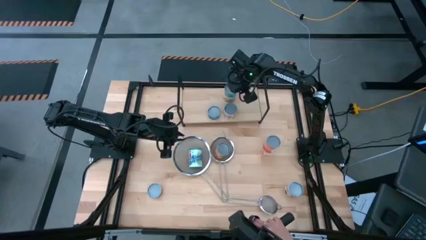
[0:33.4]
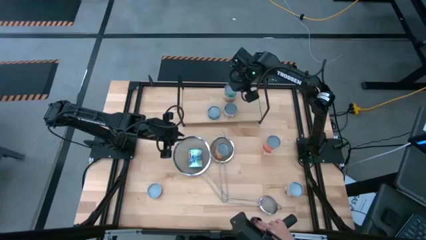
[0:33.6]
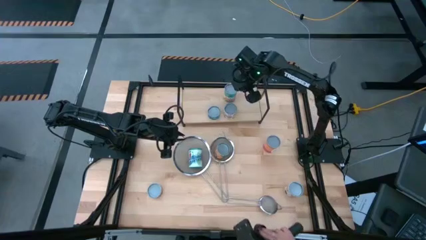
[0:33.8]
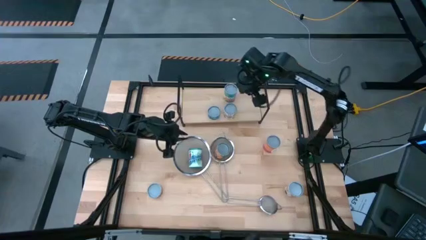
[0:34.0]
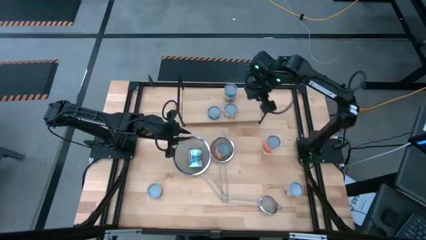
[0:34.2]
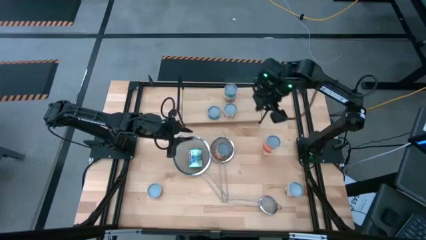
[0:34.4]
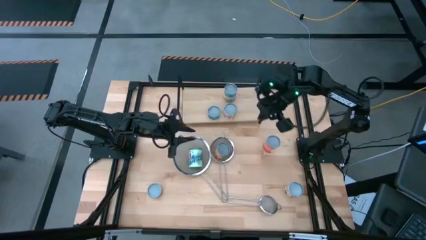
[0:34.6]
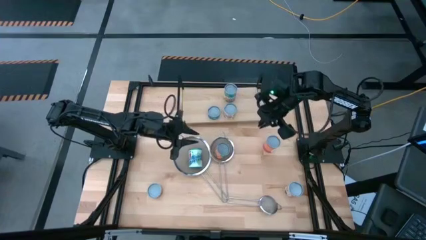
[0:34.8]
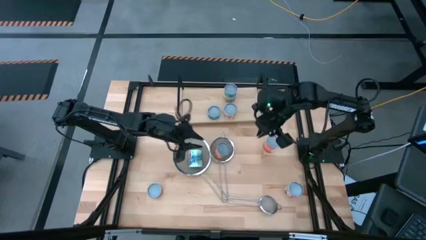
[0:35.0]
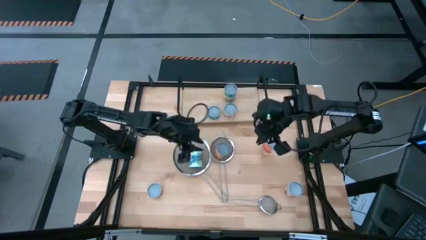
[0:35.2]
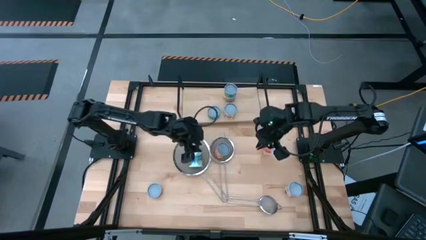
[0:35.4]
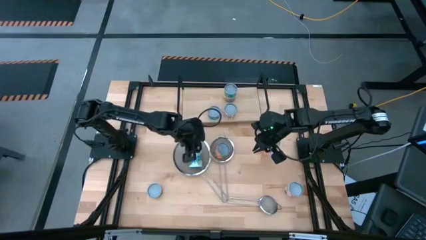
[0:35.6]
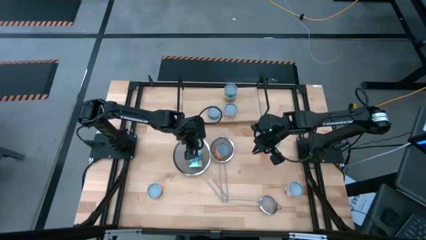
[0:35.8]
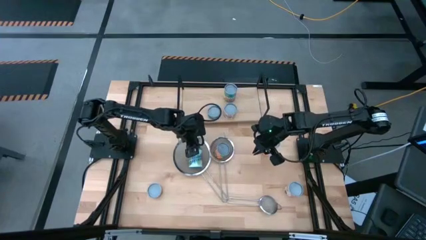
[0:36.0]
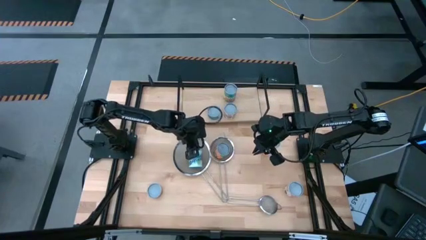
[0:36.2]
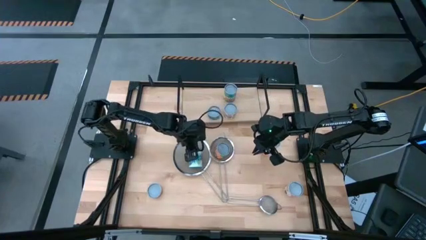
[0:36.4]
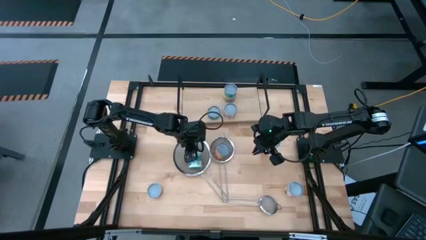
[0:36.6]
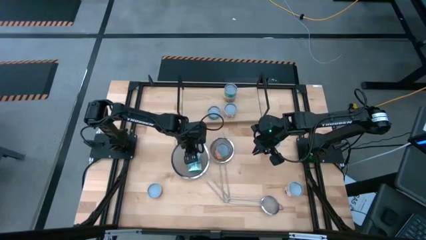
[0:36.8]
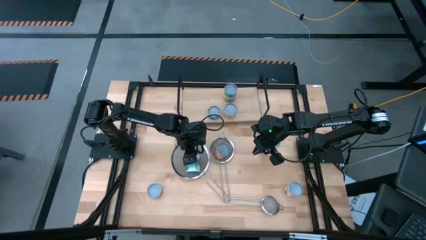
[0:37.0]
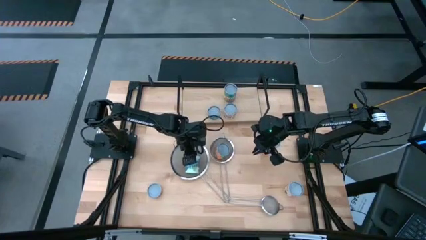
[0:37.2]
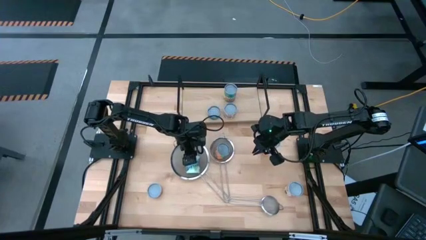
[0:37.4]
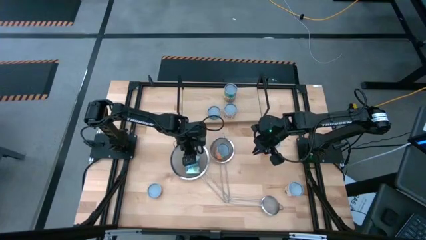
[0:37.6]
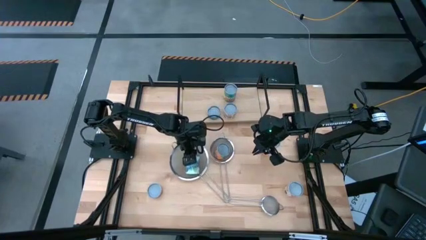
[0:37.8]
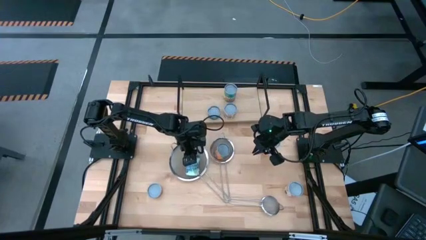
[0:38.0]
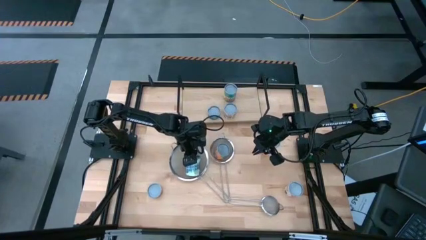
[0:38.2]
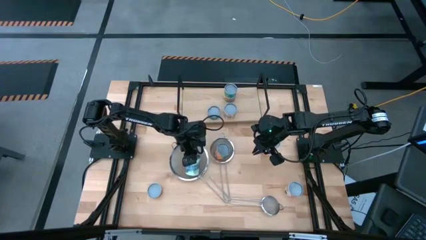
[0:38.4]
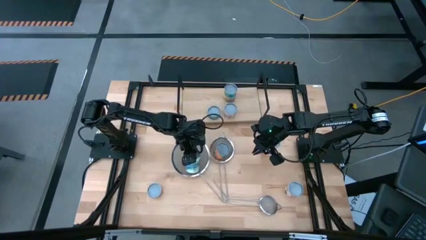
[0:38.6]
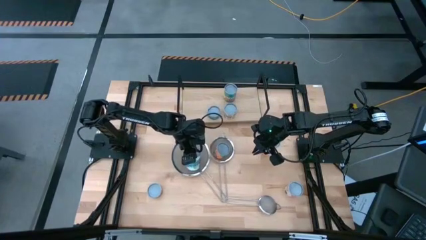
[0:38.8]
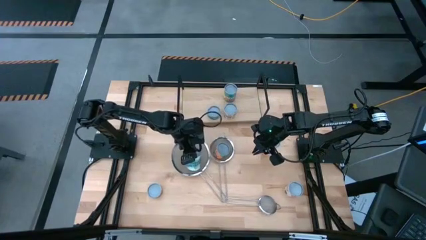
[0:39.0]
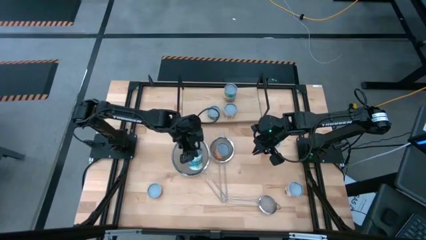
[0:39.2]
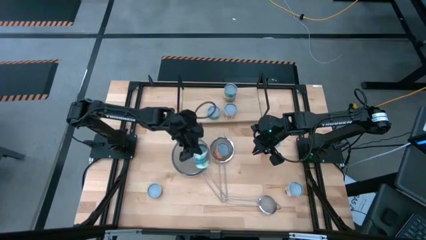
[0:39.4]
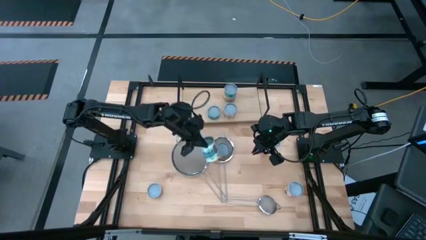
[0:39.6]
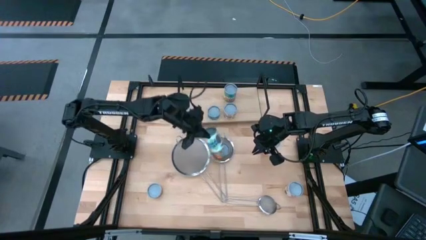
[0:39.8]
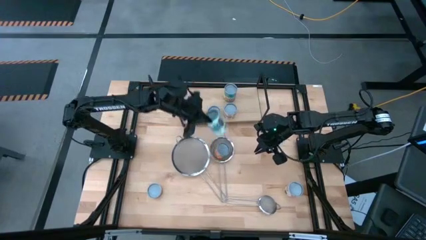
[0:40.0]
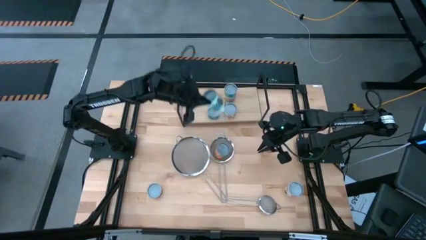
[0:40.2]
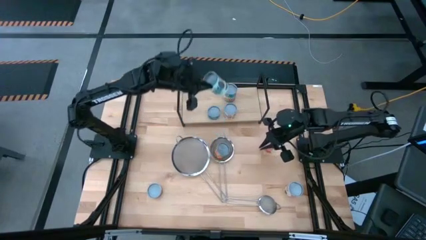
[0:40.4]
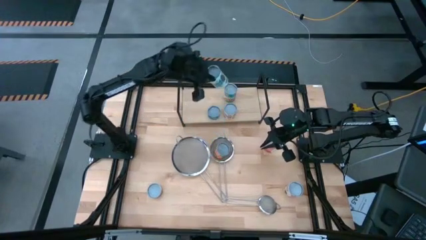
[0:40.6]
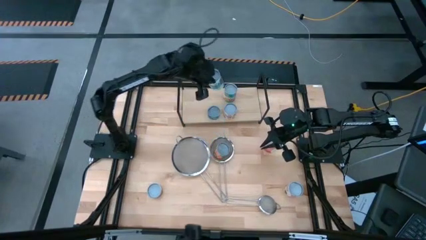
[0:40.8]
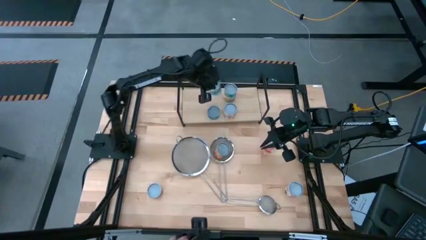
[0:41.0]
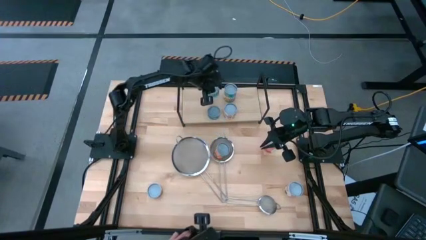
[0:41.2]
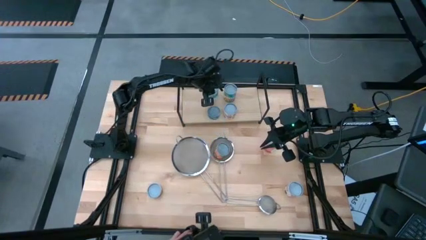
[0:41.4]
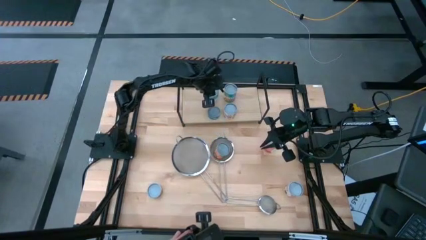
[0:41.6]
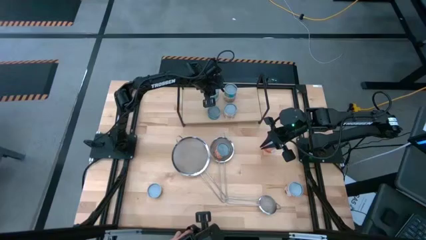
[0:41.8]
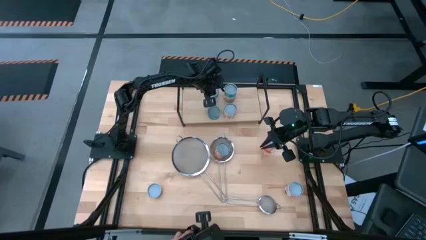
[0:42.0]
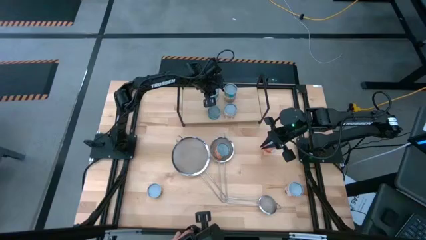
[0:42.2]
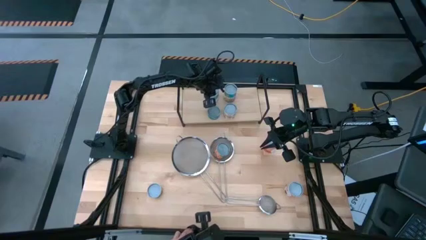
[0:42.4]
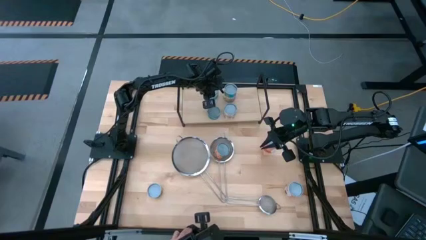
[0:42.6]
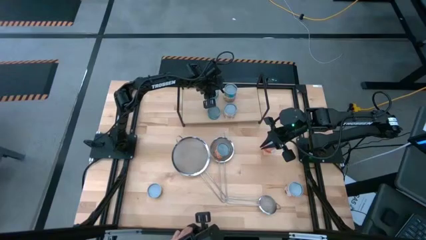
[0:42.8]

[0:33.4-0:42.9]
Task: Pick and place cans onto a shelf
Put the canned mixed veggies on the shelf

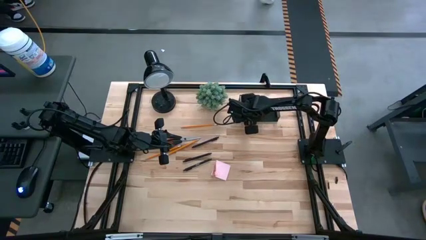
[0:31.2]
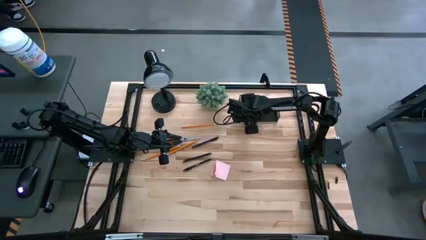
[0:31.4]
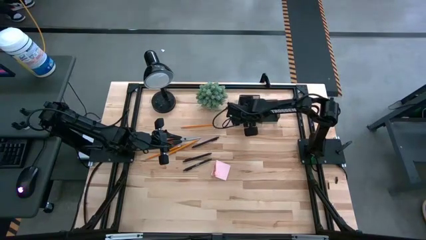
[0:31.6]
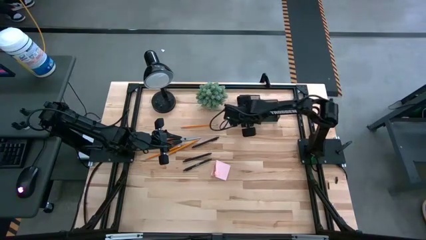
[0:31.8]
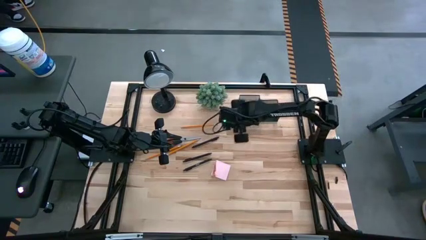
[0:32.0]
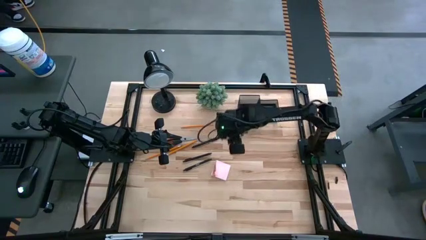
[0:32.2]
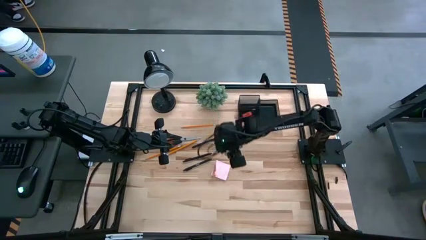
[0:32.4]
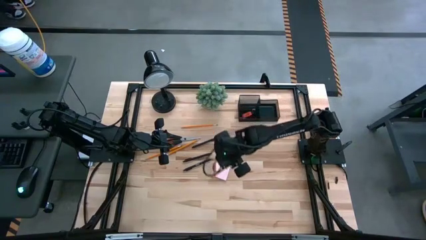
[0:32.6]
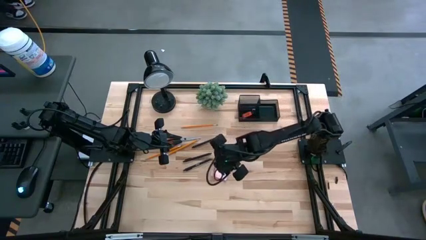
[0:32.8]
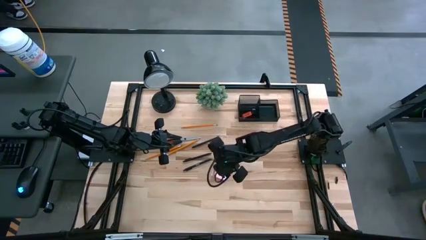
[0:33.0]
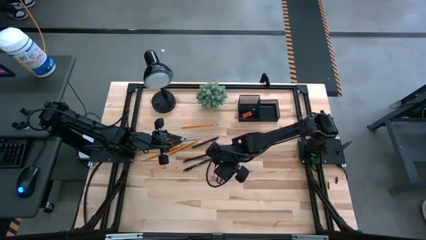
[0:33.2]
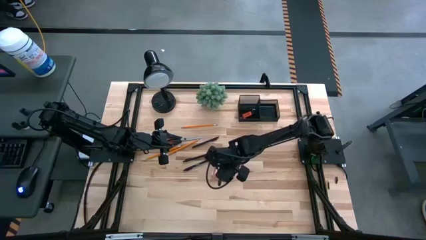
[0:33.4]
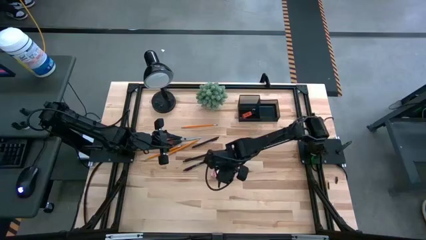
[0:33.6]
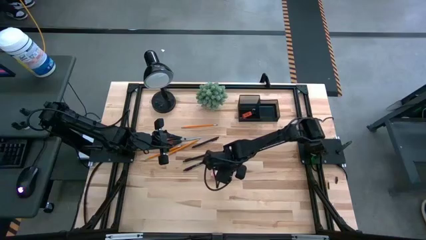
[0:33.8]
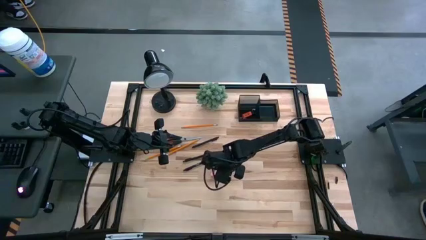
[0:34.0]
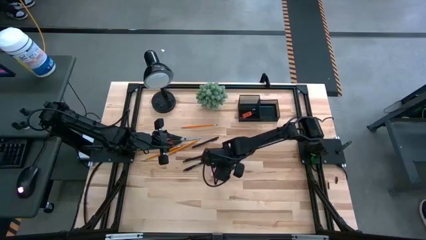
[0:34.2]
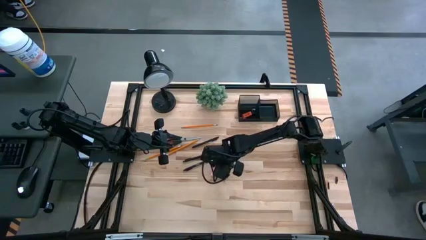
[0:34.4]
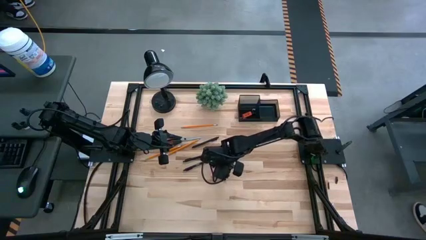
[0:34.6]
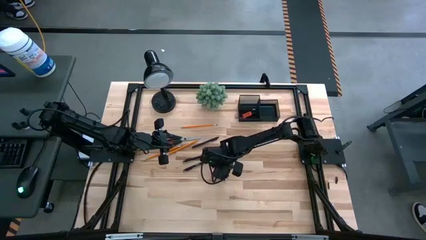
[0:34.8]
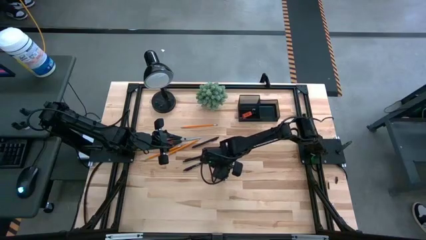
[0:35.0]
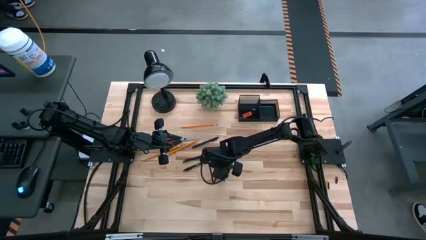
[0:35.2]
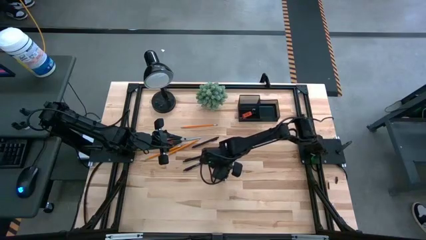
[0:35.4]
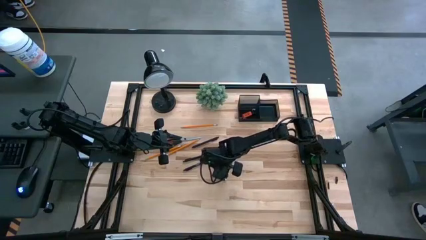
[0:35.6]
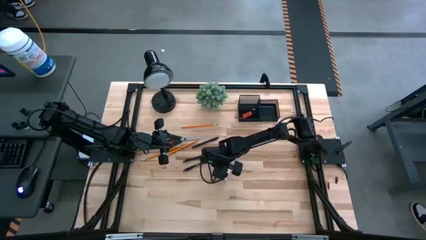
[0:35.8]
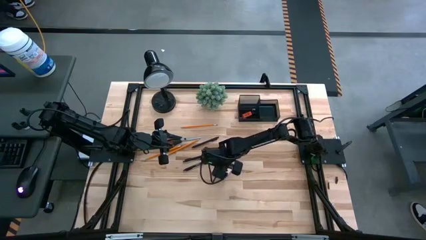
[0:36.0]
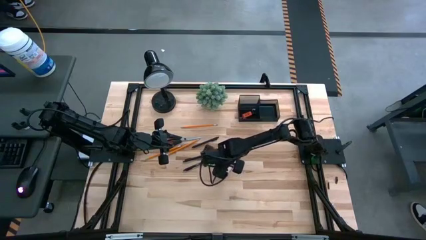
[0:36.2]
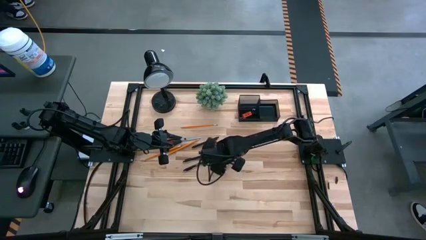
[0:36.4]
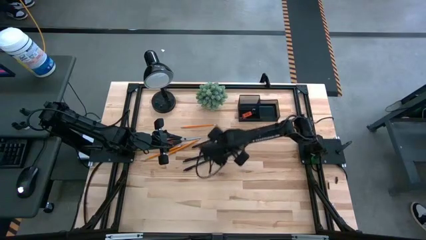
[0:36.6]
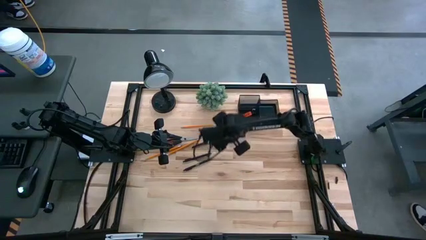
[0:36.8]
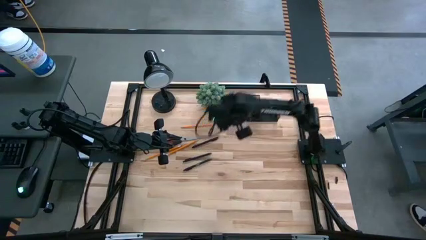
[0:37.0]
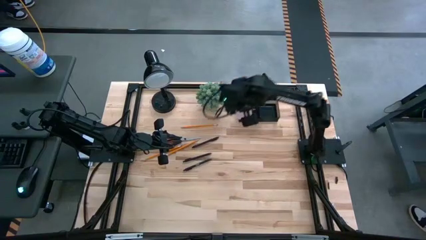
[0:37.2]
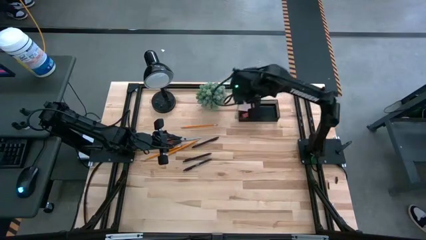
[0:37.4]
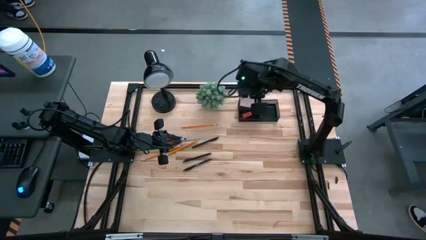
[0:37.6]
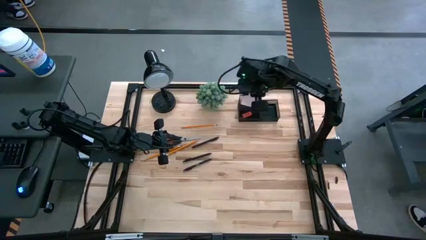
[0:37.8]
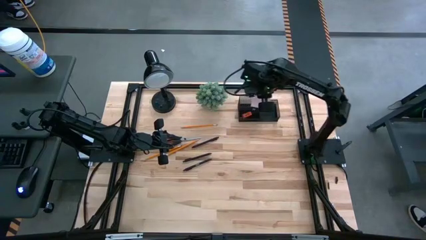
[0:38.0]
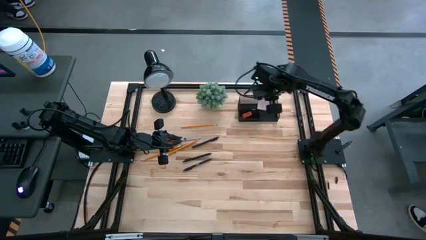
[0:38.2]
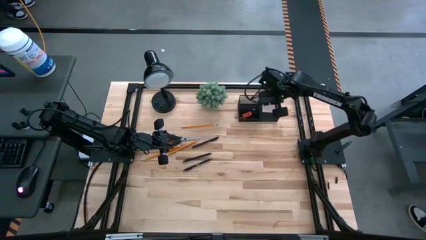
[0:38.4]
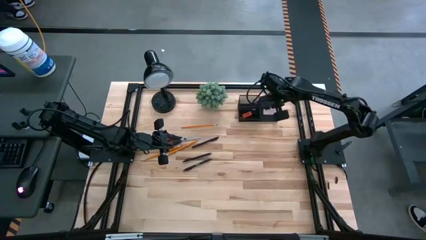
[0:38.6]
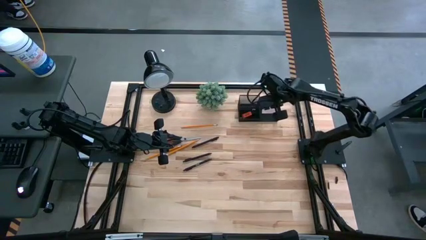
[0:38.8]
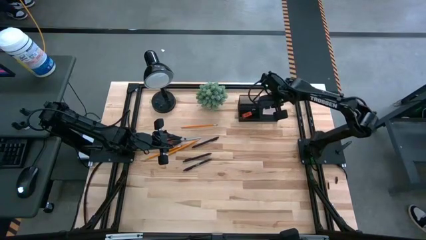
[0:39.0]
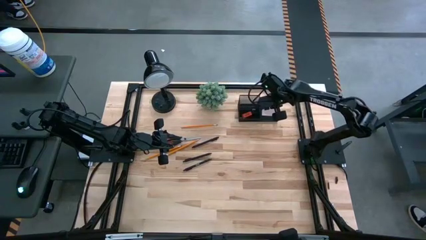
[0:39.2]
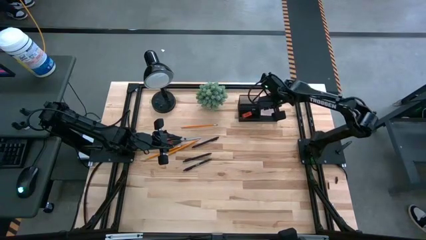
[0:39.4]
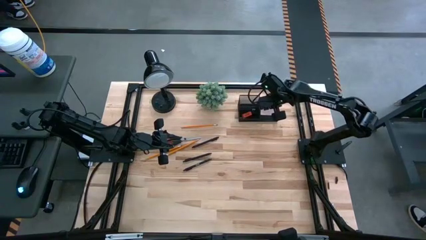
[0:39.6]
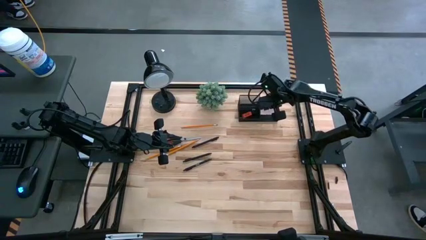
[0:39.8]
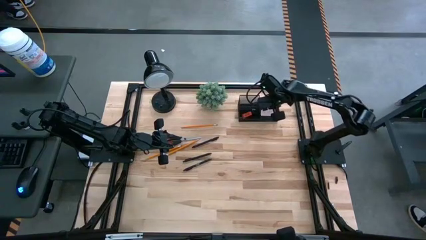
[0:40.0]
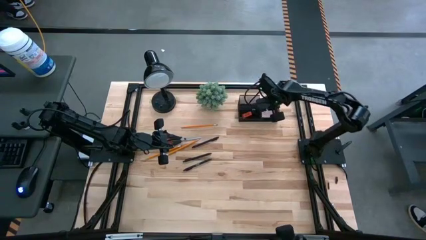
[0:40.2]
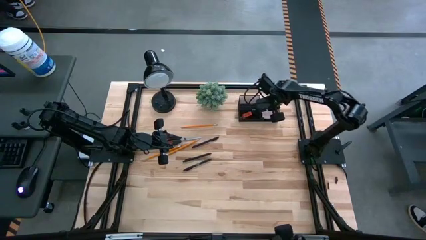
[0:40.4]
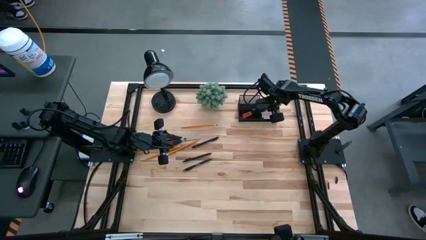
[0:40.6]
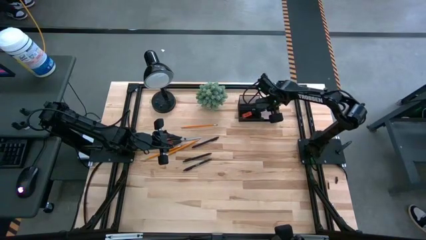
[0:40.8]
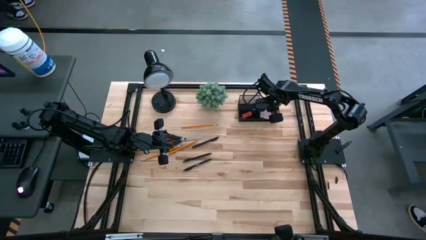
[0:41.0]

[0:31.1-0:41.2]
Task: Pick and place office supplies into organizer
Put the pink sticky notes into the black desk organizer
